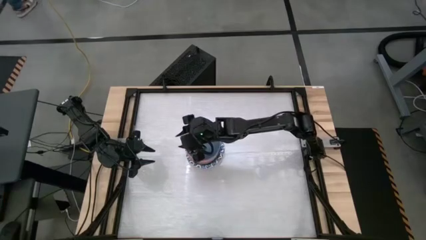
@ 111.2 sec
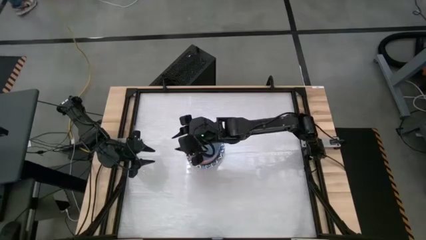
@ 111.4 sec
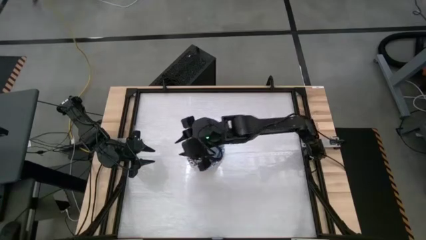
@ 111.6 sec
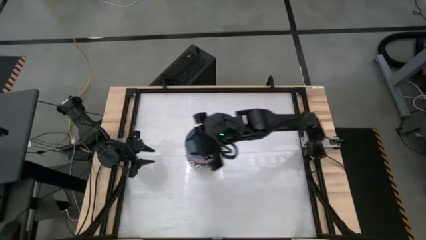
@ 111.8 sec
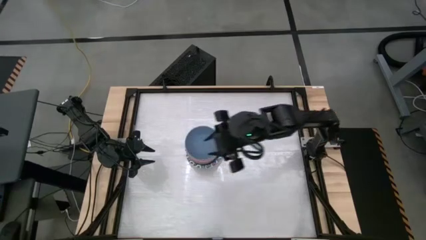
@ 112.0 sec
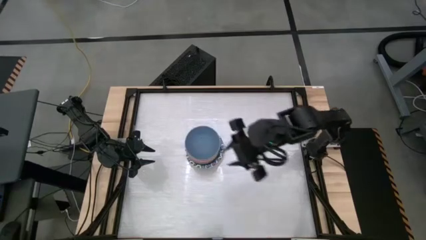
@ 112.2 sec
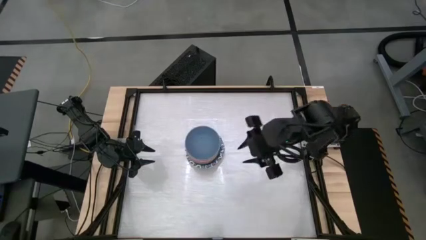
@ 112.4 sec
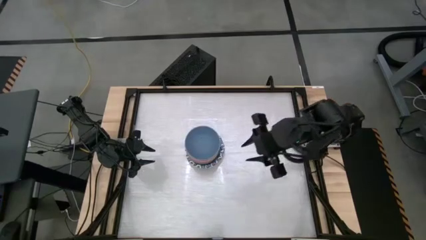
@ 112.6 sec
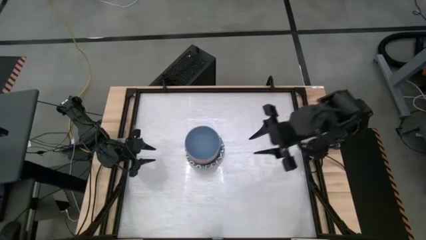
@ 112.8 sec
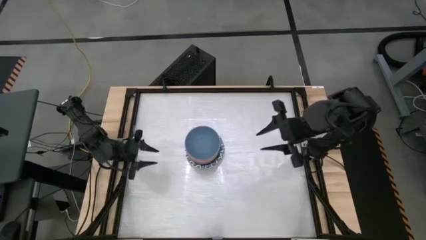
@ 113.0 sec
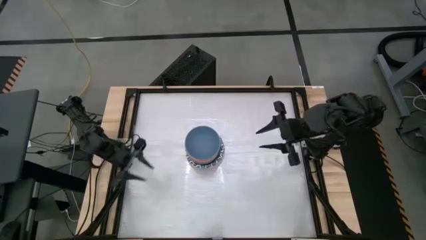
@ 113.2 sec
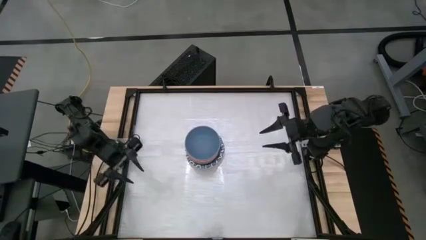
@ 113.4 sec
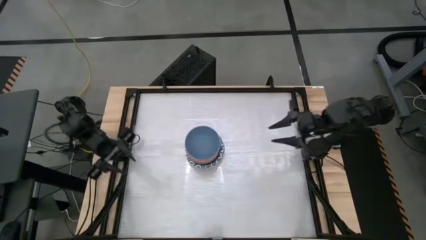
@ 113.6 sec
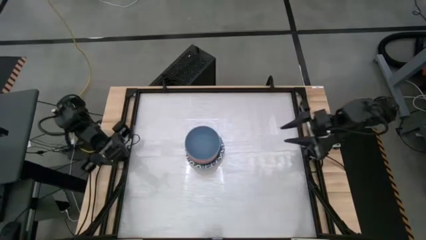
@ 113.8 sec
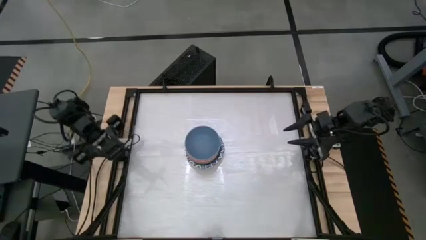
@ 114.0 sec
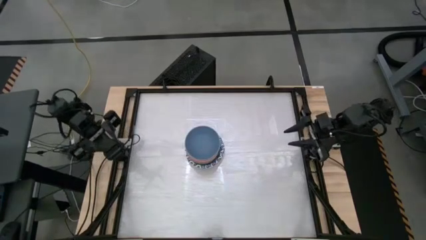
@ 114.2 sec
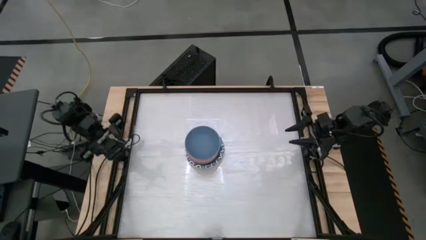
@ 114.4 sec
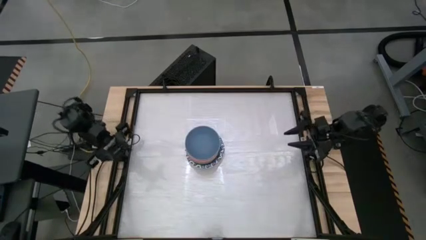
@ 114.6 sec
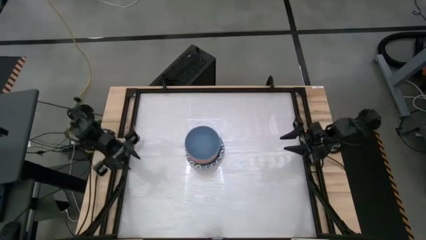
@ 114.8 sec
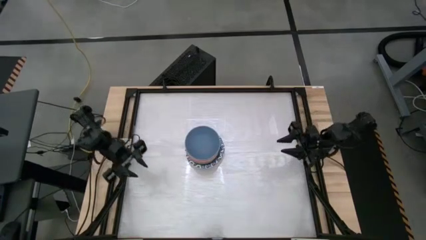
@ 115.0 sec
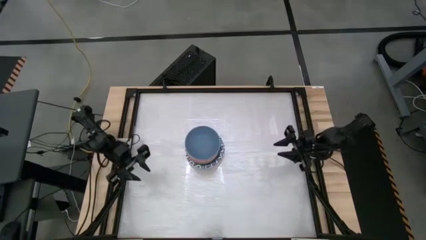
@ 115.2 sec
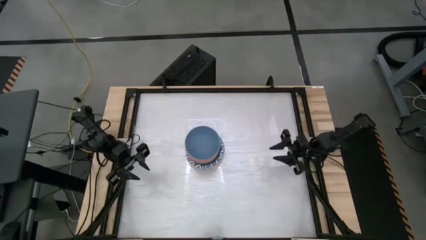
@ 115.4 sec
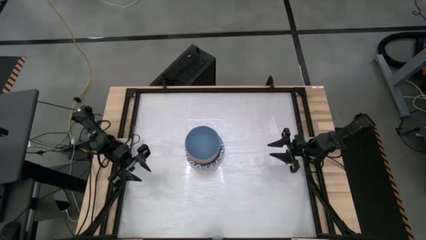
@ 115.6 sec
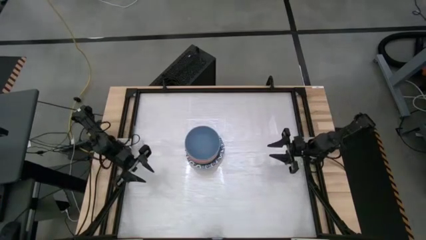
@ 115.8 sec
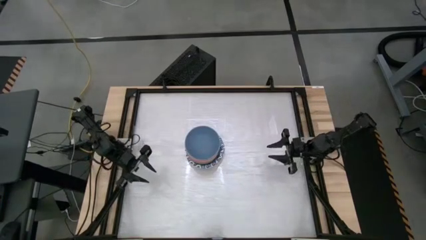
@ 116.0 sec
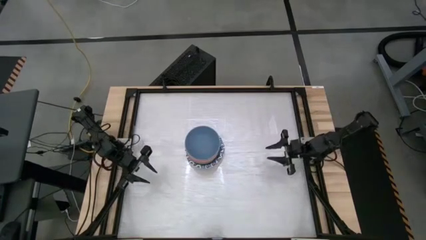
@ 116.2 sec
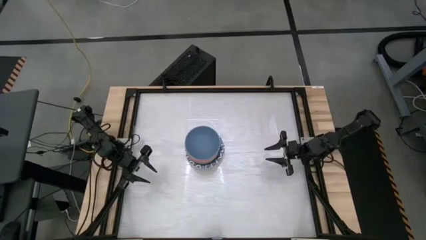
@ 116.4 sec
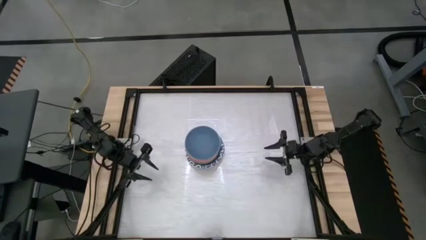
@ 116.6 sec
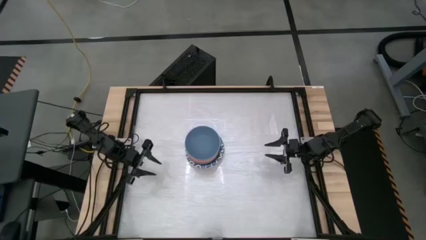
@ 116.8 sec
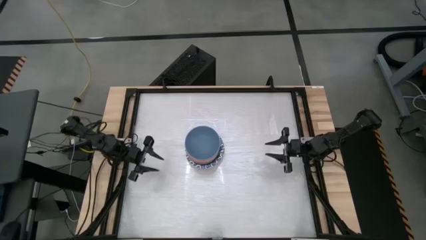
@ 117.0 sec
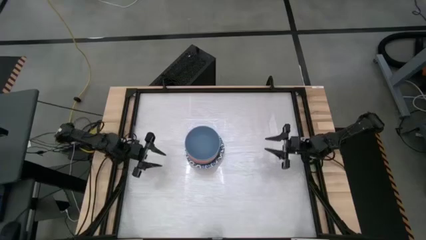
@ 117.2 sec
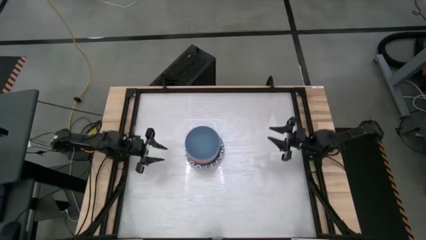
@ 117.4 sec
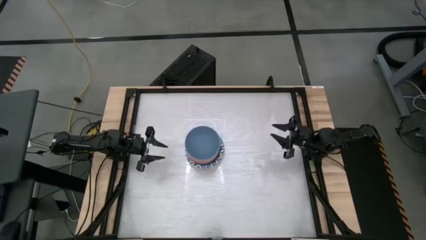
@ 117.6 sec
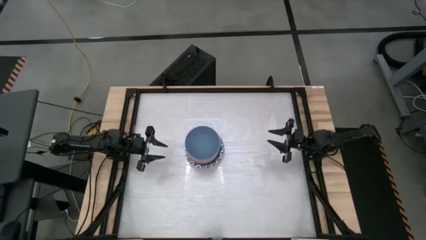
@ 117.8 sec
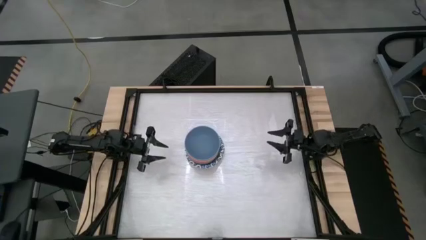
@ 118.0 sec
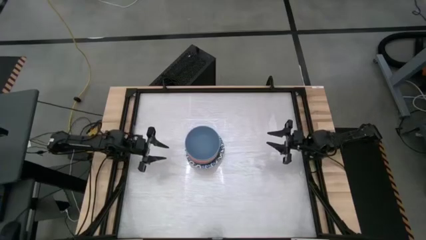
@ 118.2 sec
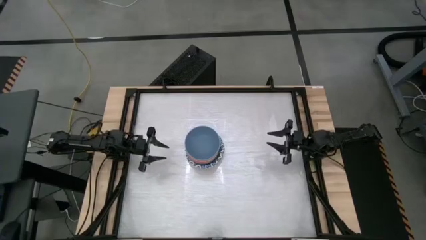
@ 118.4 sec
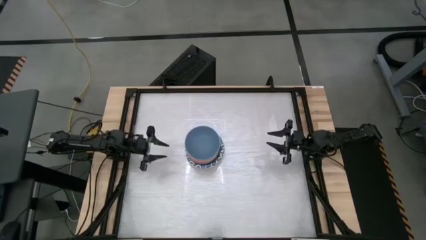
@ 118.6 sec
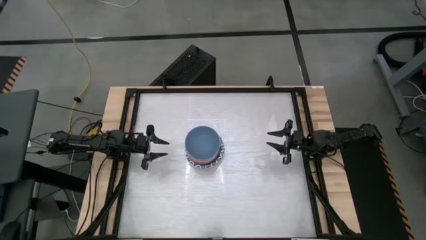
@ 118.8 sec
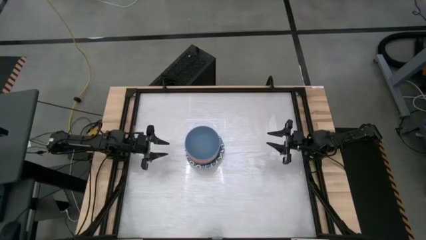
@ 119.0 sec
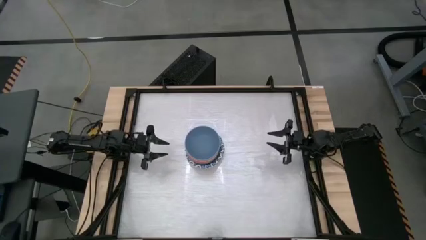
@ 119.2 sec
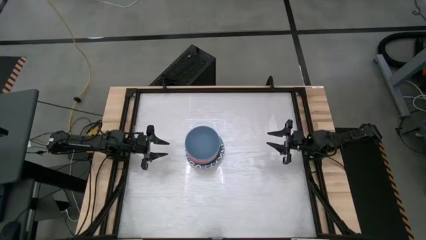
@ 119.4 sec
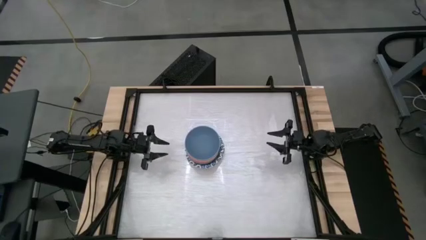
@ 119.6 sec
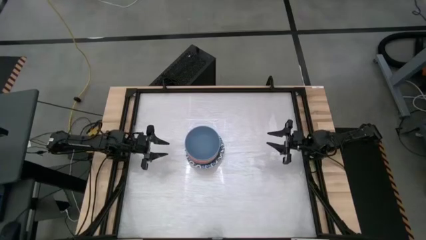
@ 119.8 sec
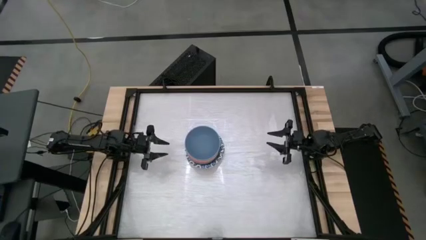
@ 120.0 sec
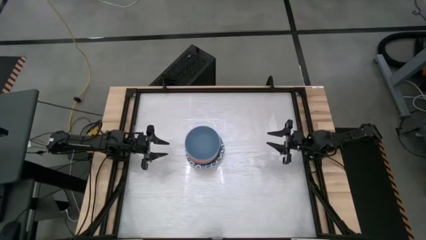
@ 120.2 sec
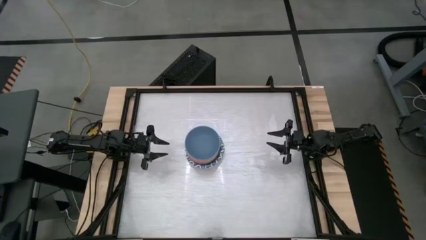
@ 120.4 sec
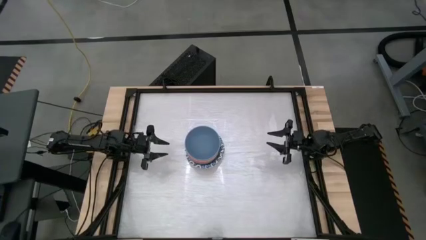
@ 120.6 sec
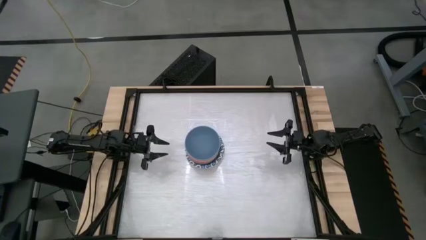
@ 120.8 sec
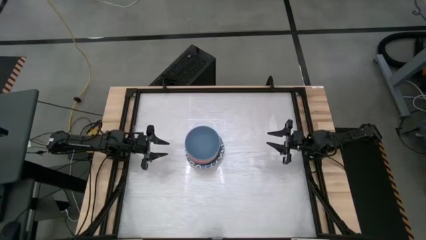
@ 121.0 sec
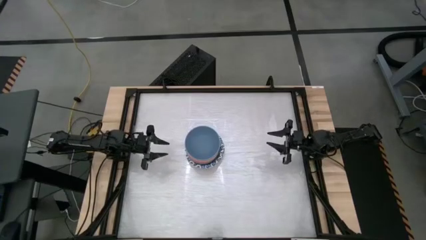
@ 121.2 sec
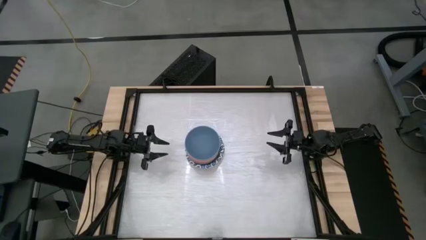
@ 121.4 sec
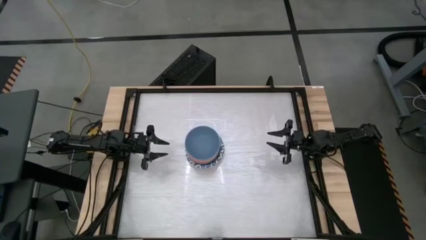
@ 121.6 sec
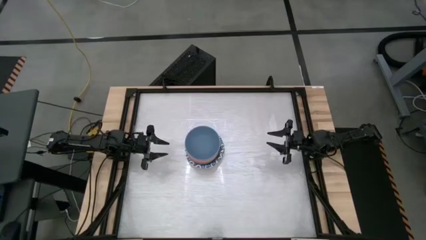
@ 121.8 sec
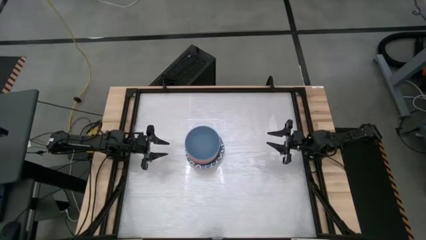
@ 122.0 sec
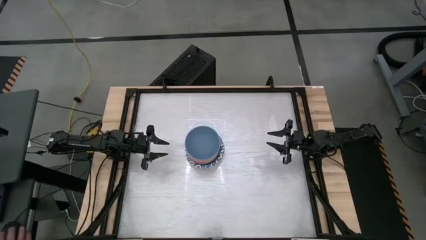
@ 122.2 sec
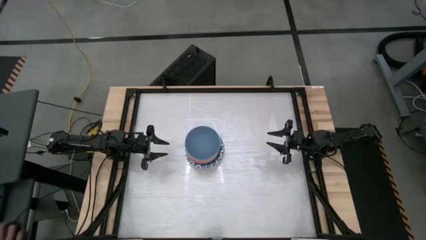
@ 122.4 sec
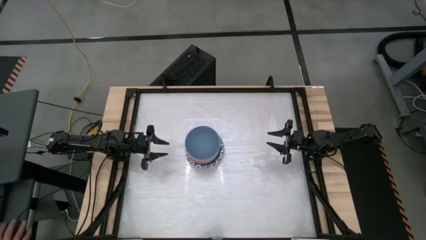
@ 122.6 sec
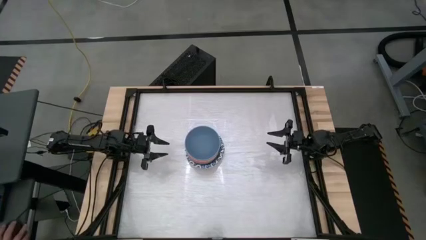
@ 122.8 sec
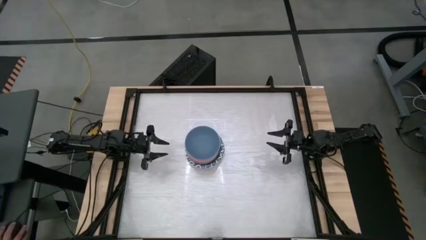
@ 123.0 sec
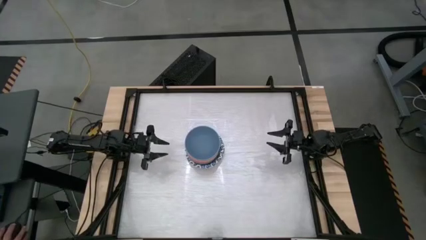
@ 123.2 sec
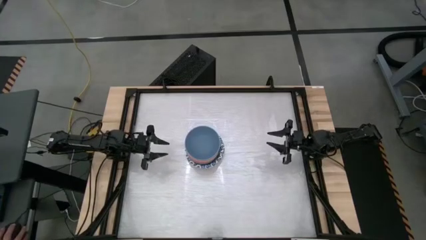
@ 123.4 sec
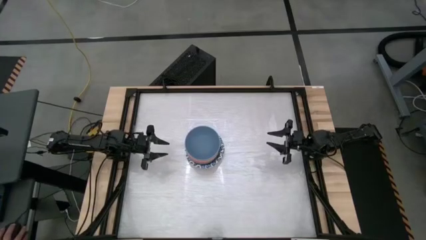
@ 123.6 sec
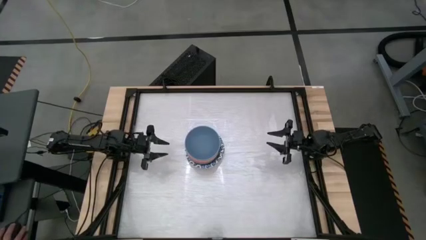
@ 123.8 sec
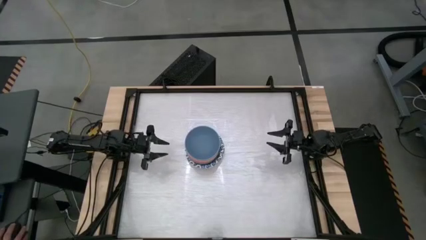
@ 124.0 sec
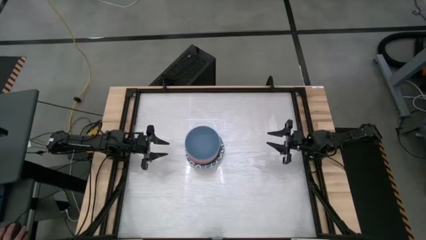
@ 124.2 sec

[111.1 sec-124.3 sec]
Return to Home Position
